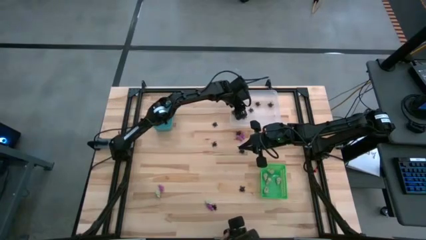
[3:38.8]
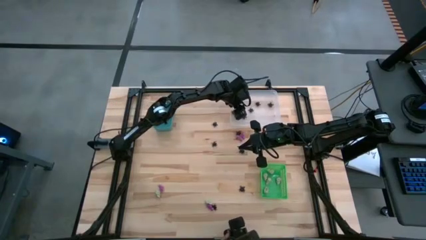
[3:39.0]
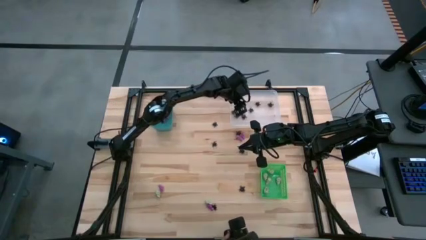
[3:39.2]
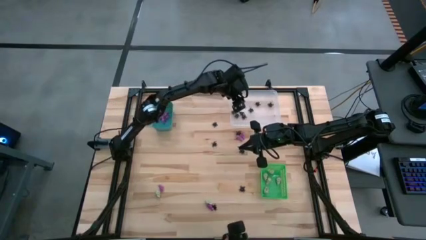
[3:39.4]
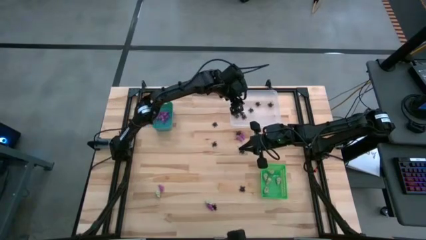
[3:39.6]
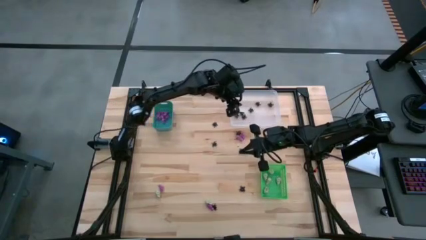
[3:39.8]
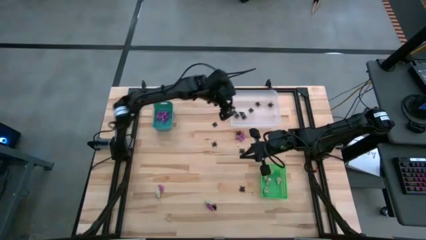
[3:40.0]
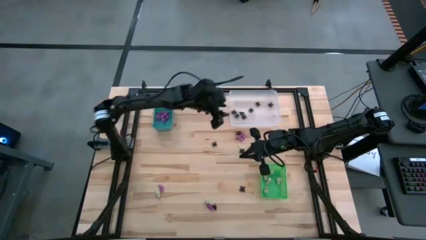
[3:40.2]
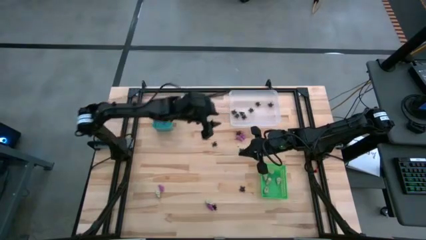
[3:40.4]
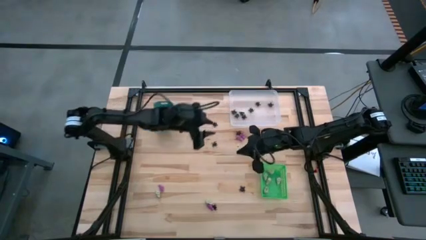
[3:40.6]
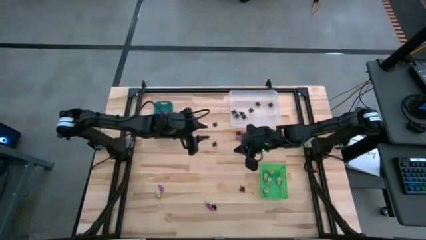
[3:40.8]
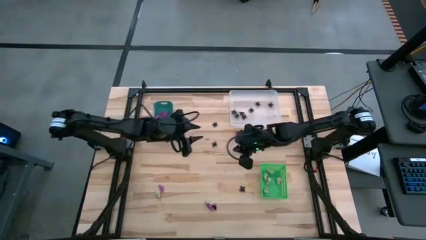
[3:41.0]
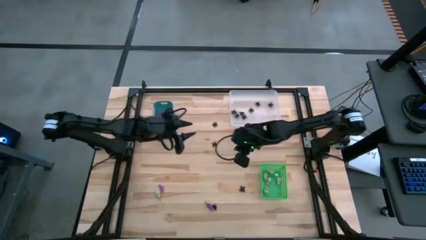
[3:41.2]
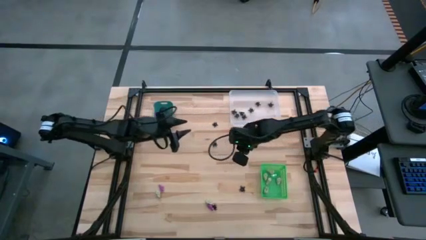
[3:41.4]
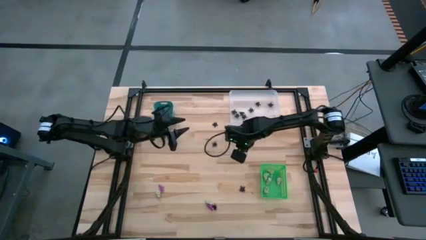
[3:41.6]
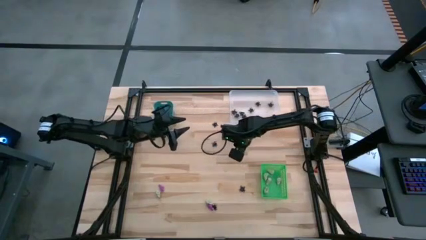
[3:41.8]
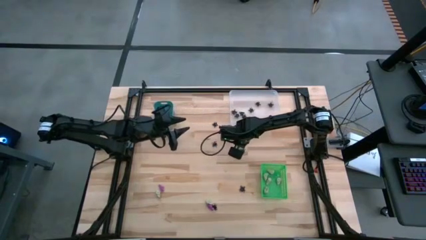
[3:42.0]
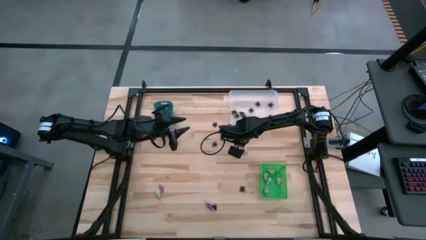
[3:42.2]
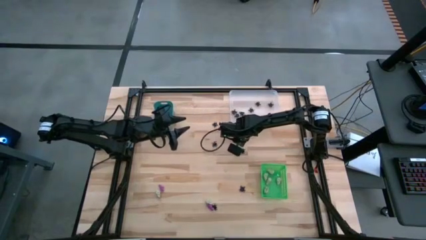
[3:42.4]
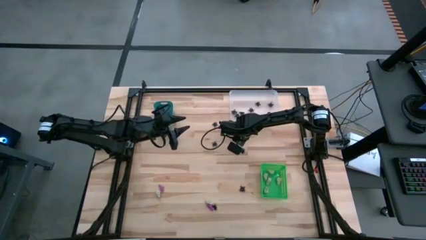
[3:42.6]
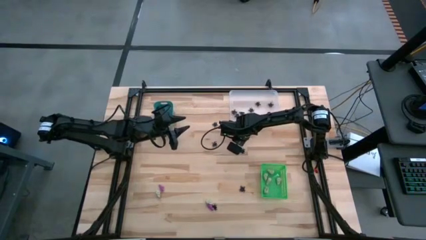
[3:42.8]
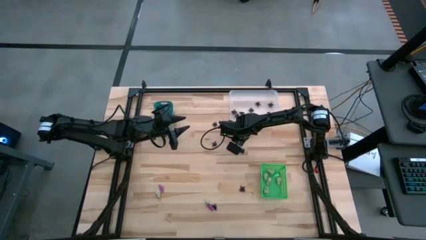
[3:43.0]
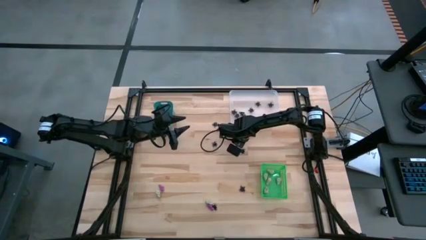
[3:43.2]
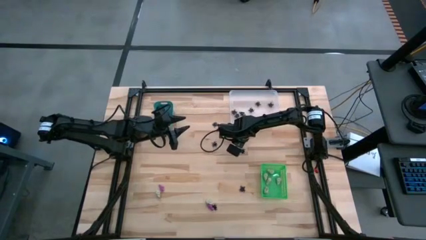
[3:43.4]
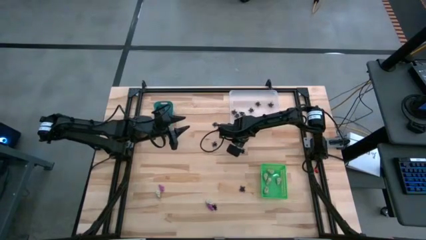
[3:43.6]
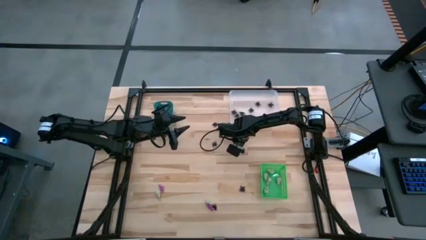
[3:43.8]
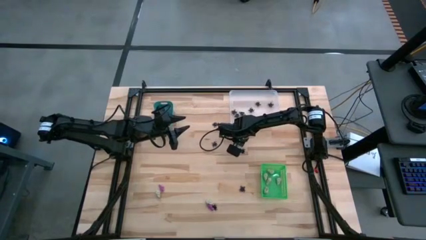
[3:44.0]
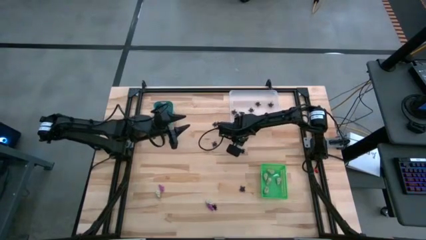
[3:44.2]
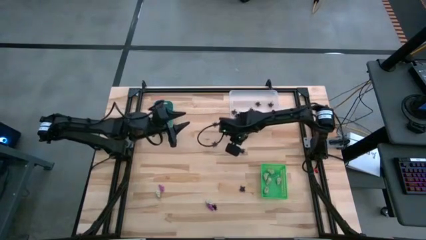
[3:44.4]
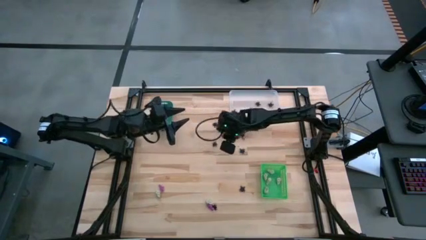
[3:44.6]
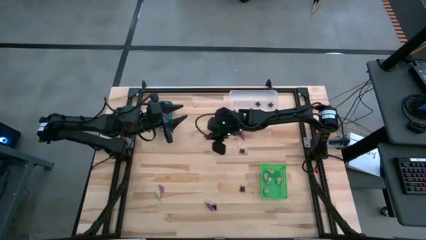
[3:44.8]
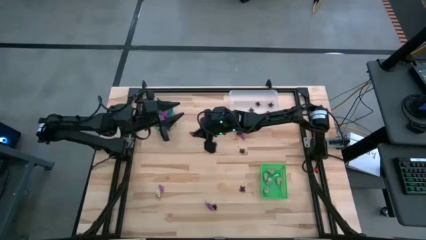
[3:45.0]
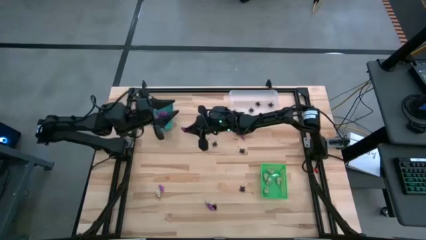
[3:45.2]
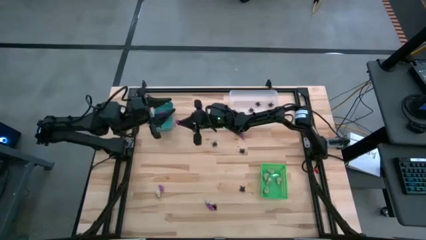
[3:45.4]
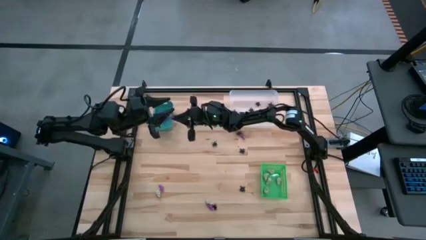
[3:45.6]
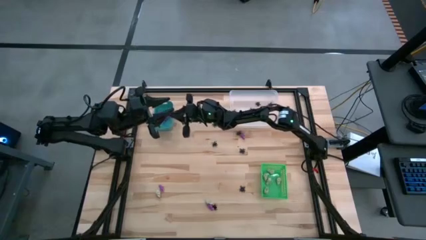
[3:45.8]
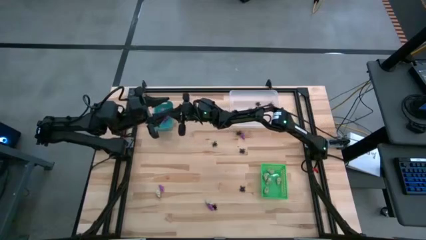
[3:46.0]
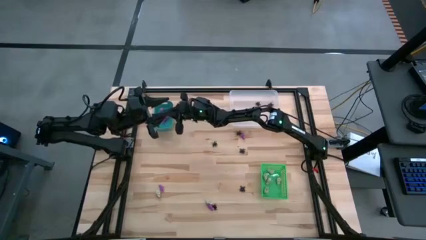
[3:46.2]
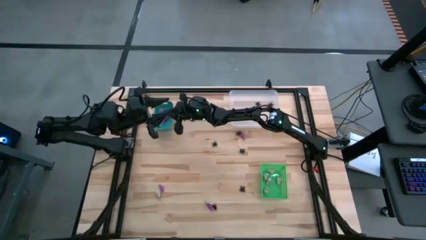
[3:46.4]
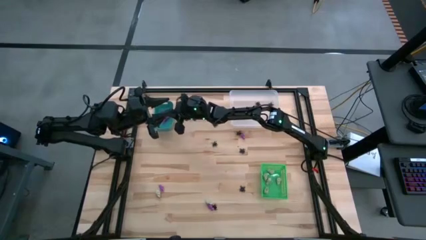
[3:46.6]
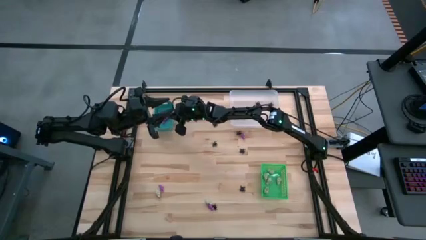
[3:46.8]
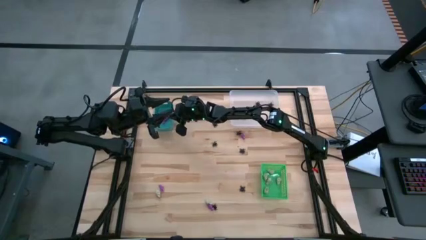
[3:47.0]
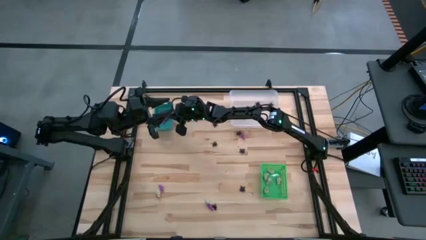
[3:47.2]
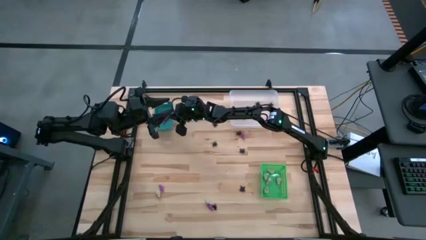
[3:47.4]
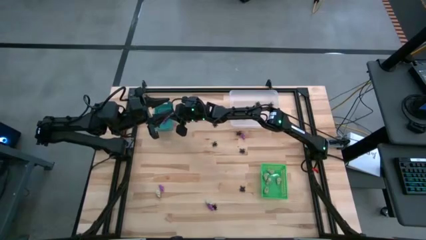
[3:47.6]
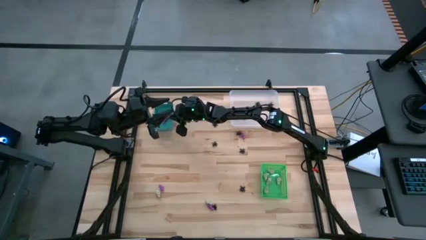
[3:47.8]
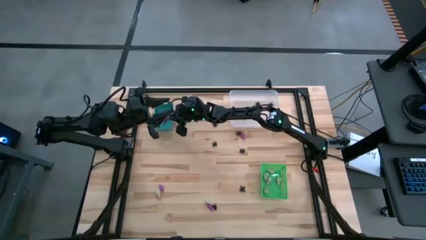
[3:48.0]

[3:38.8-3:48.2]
Task: Sort Halloween decoration
Put the purple skeleton toy into the blue bin

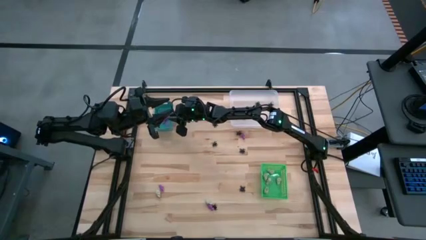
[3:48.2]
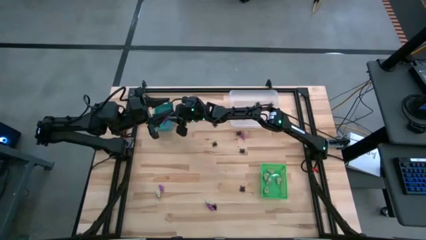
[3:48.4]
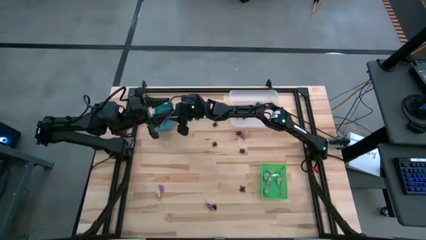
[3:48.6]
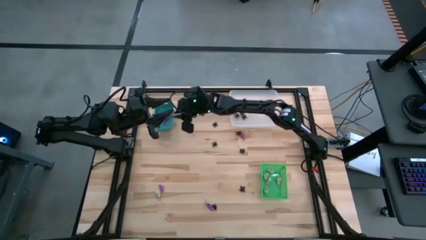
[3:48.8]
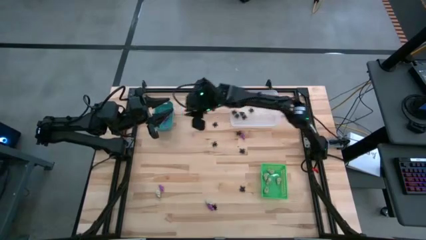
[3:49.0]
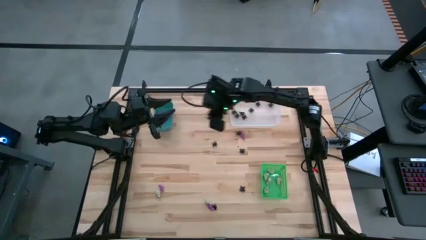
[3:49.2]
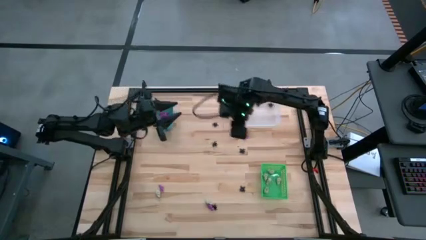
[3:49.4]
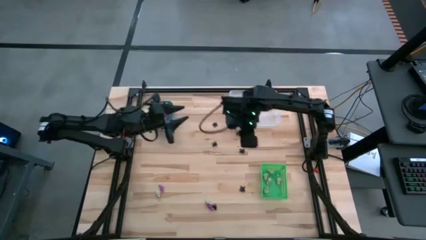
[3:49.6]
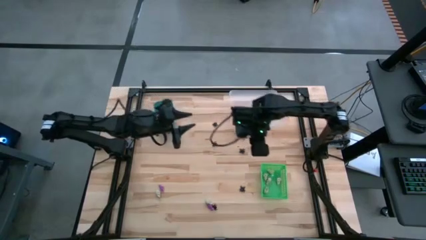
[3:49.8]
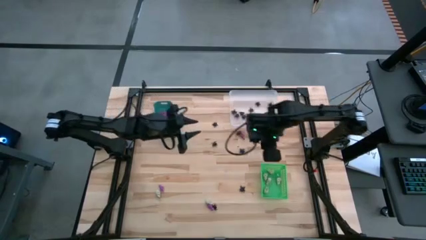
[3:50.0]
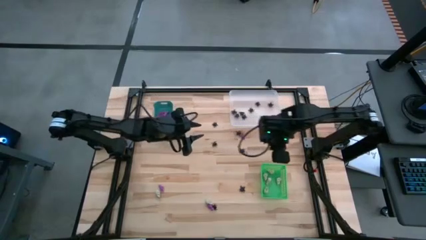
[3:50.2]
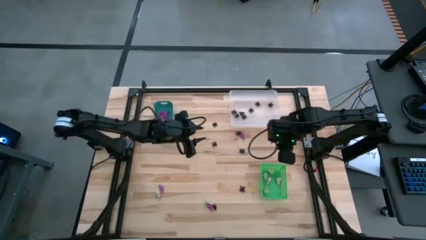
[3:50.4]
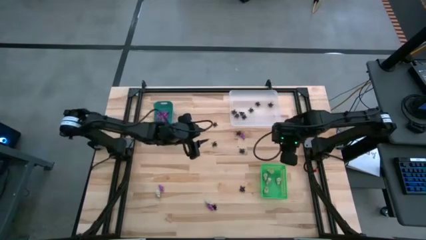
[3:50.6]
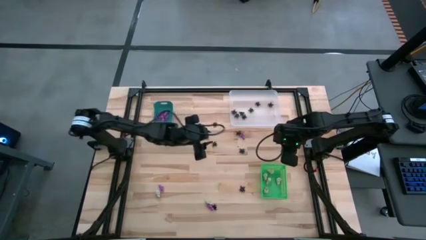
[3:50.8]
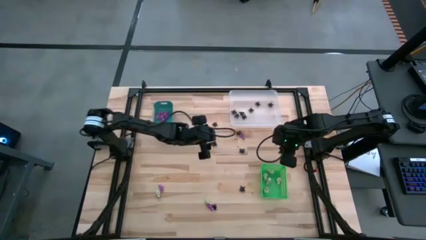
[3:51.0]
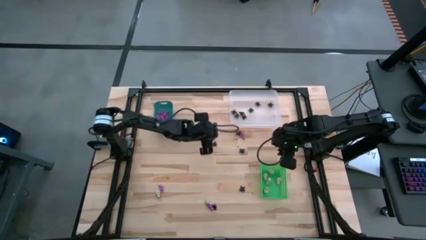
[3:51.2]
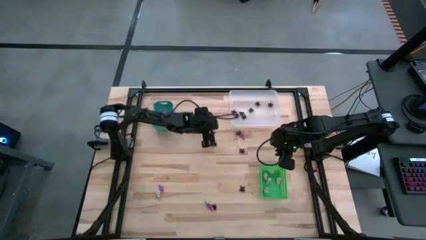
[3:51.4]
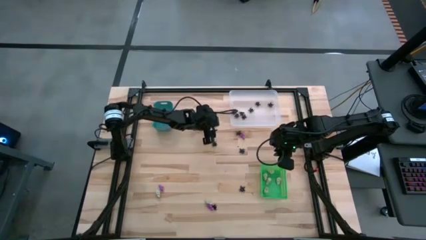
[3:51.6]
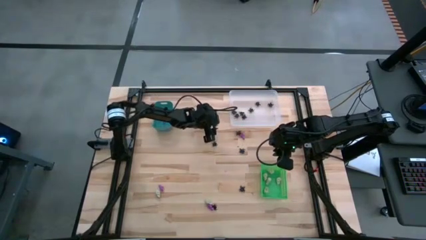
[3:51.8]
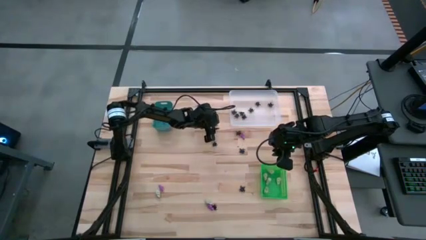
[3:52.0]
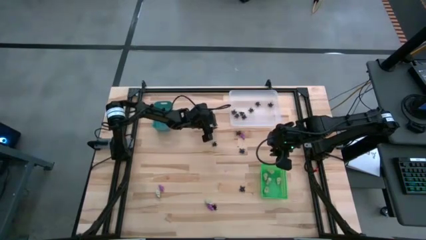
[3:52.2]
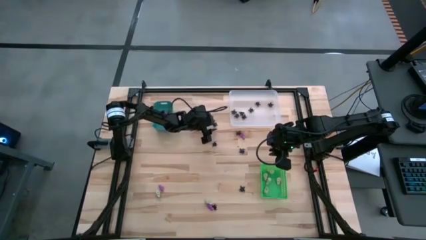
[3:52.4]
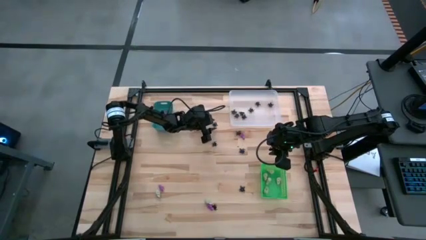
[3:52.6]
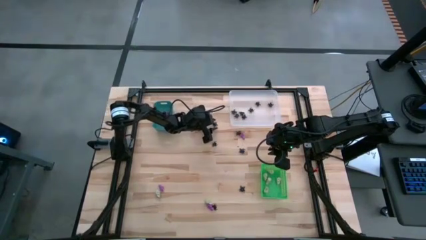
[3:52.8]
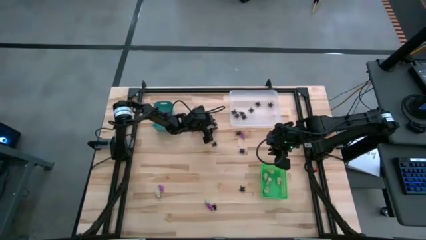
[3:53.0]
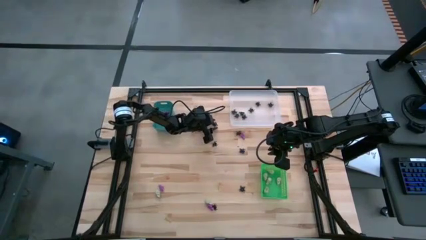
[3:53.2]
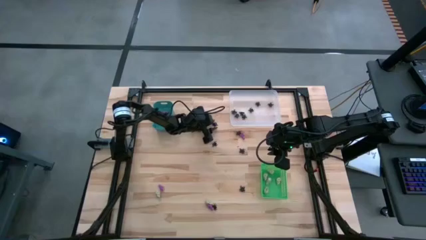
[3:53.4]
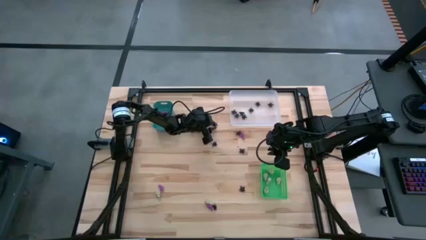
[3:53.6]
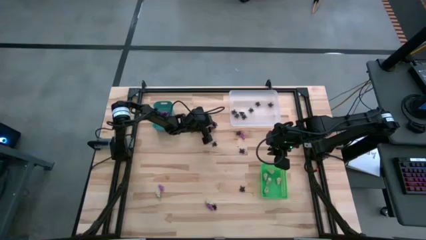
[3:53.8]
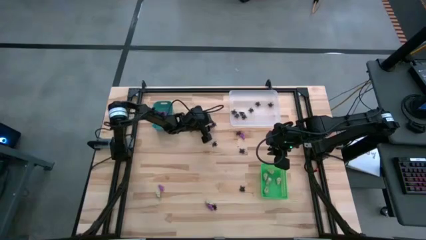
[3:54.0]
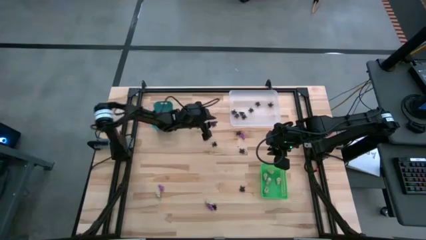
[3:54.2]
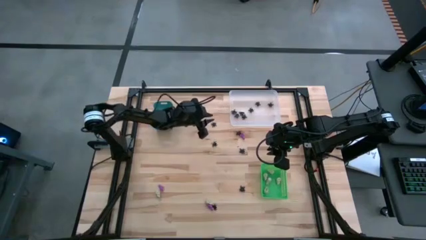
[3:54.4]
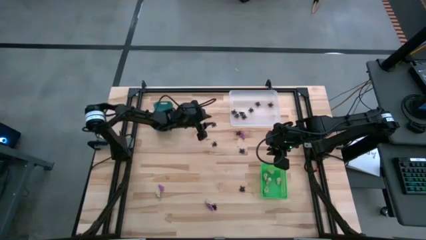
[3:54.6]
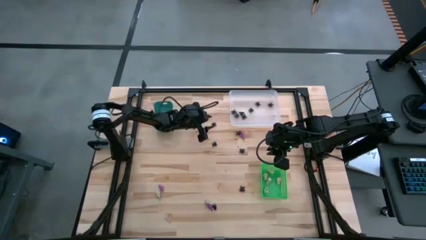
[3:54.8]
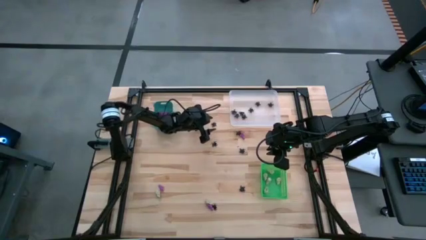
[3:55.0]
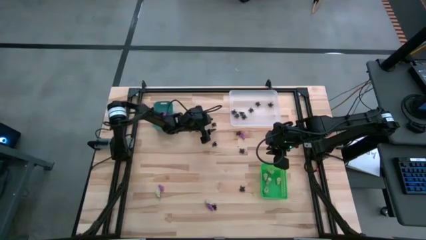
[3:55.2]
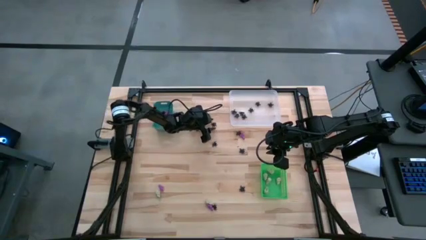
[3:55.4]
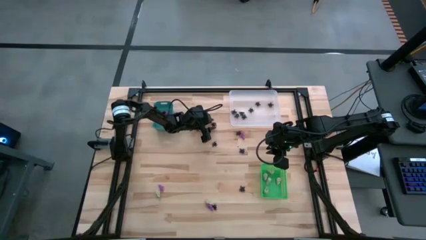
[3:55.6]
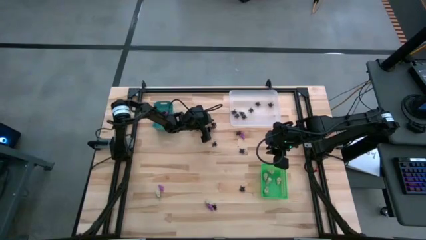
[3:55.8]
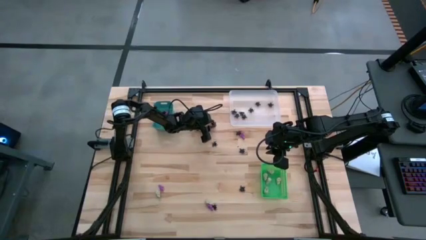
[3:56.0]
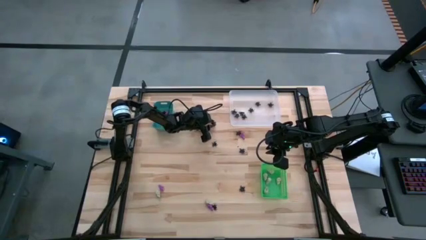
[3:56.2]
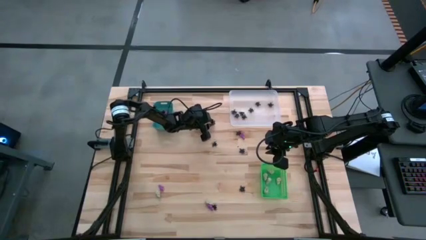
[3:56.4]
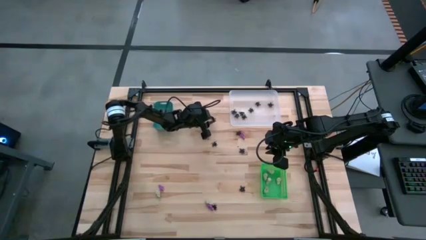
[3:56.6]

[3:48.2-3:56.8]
Put the black spider toy into the white bin
